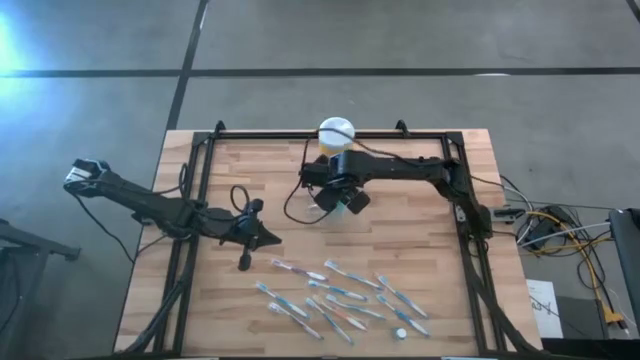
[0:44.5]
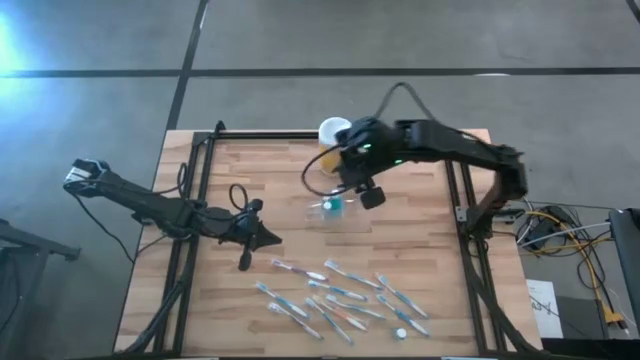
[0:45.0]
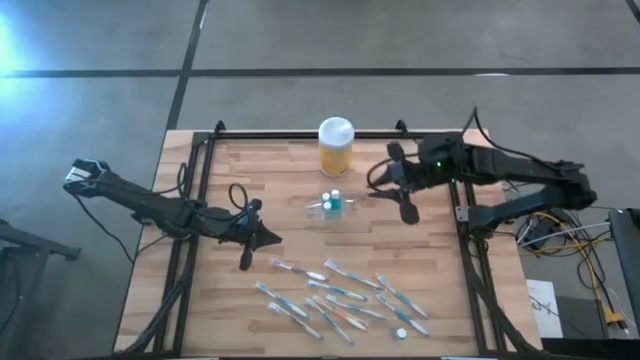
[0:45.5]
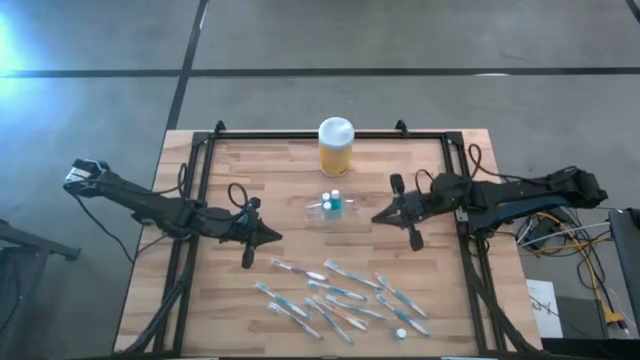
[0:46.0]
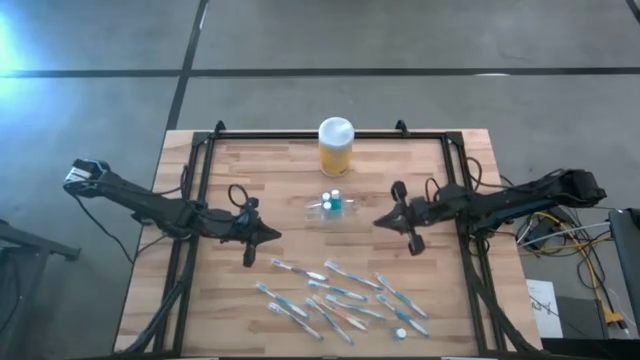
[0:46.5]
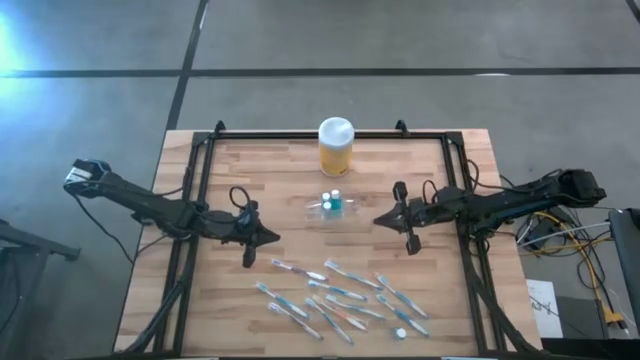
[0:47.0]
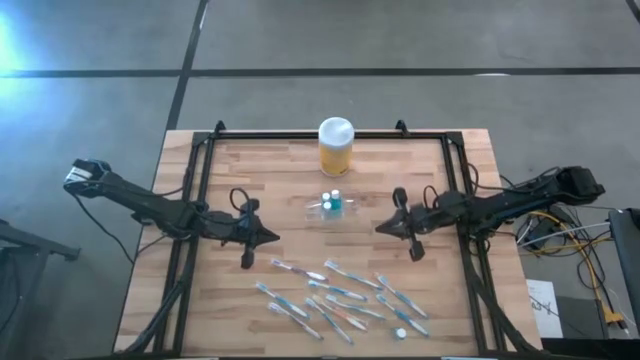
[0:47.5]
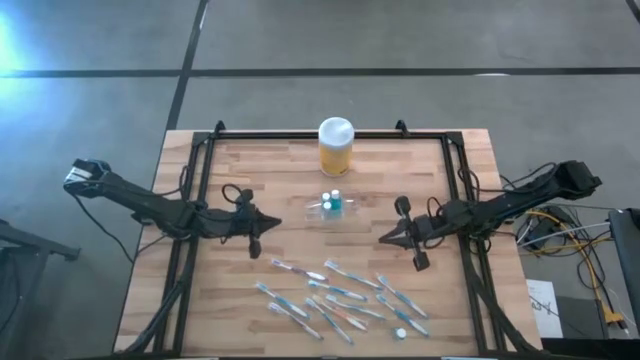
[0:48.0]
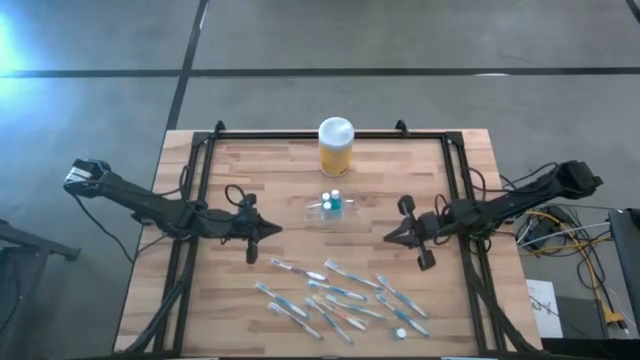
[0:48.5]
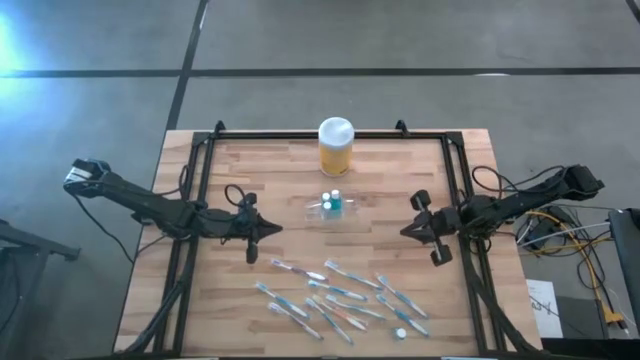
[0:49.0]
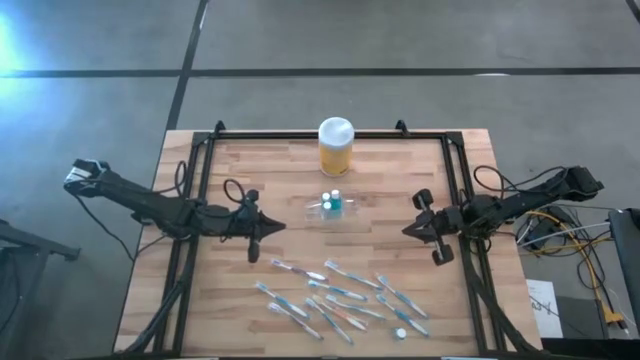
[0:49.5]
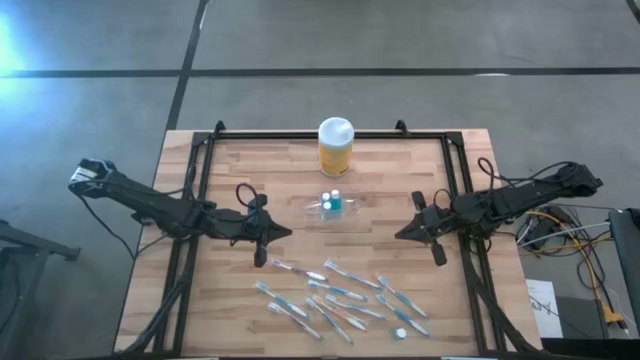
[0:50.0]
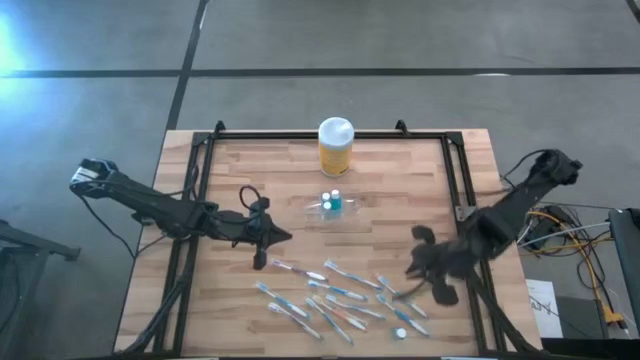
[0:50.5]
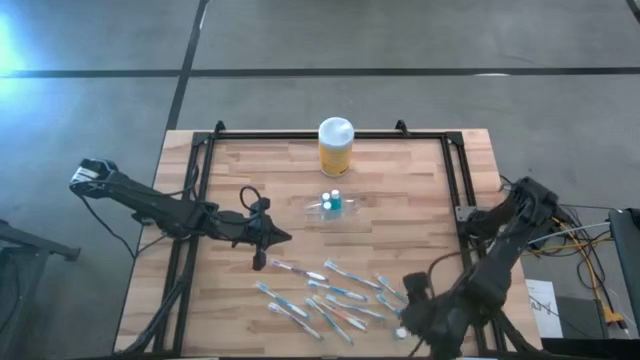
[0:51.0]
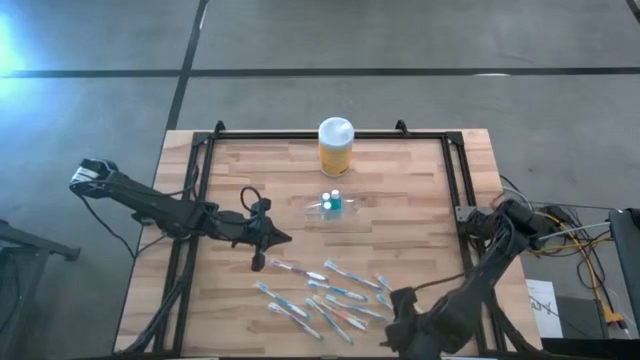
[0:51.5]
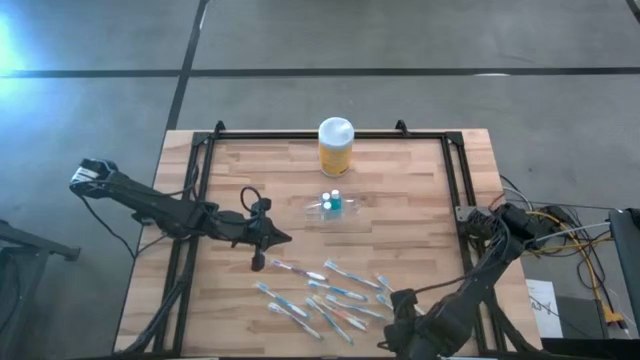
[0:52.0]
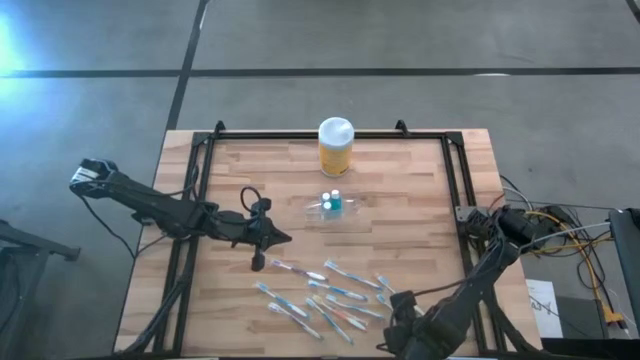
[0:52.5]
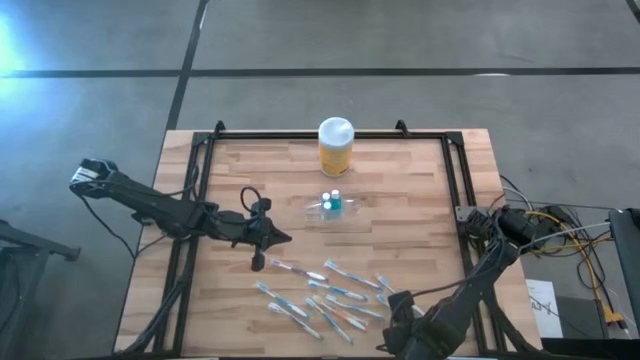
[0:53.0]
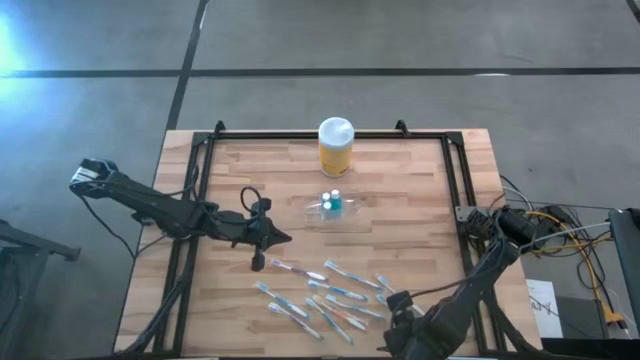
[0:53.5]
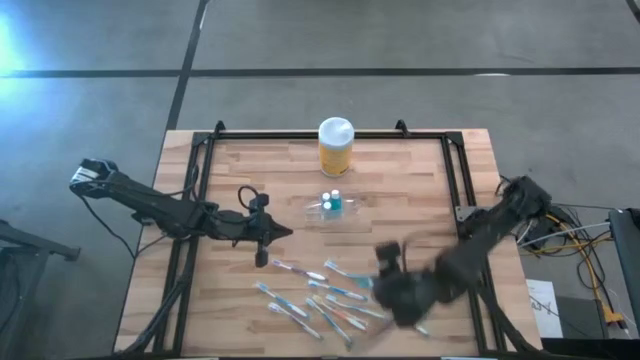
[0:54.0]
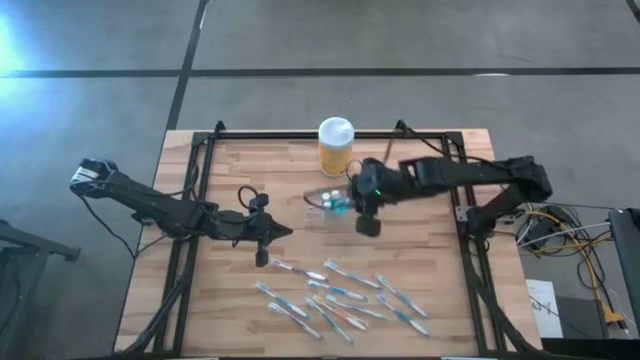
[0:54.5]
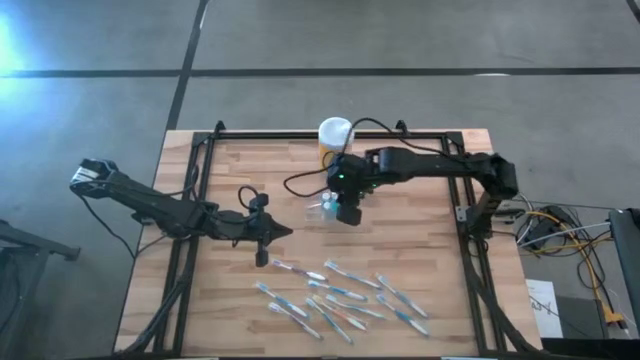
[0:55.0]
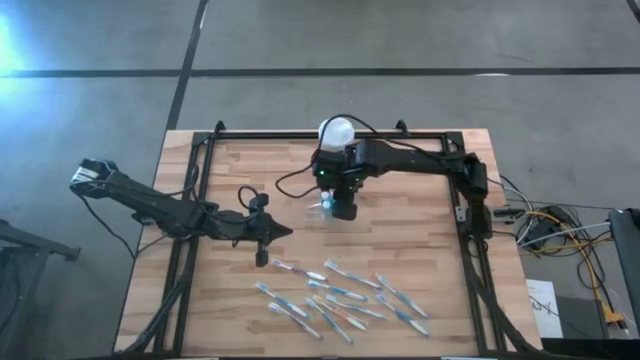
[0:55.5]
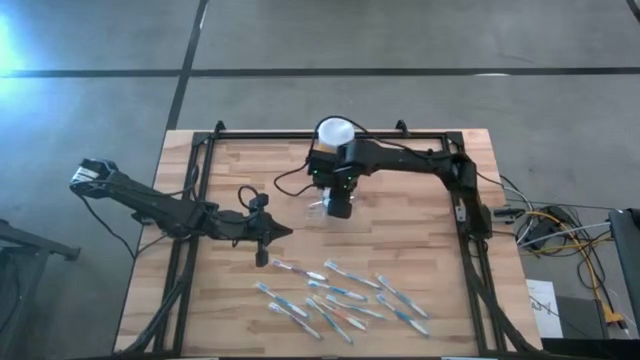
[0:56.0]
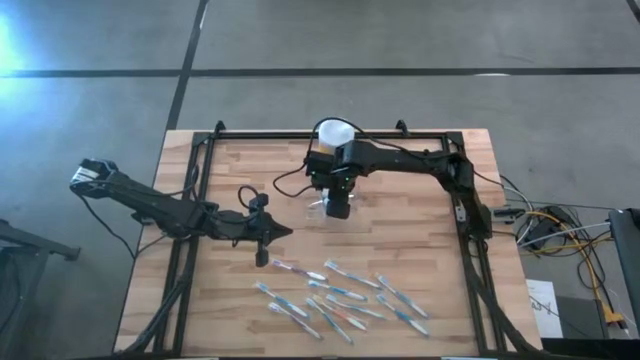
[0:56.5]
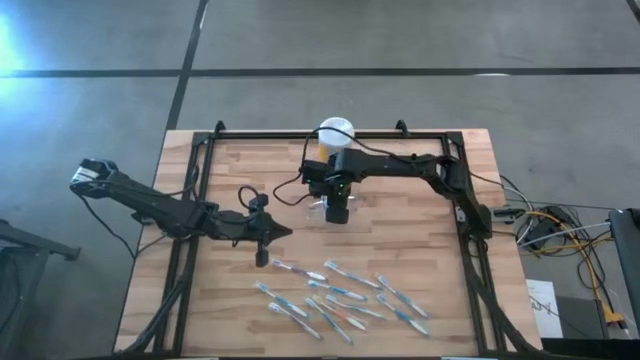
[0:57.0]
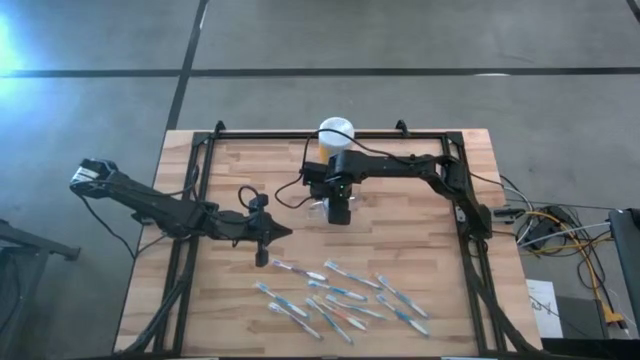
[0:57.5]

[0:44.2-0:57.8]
Task: Pick & Place toothbrushing station
Put the mouthwash bottle into the transparent organizer

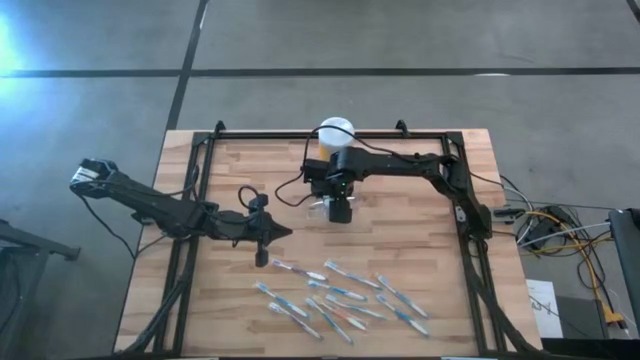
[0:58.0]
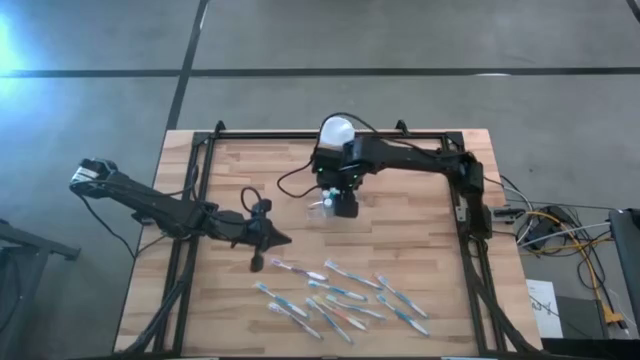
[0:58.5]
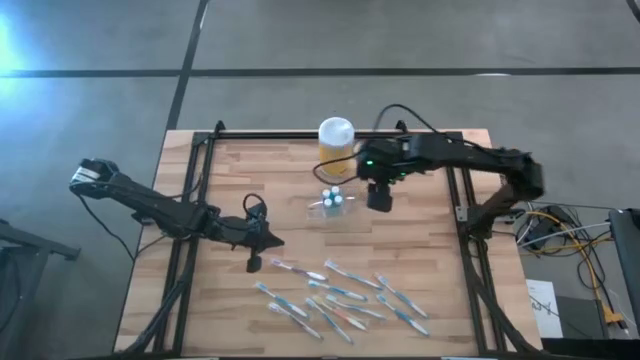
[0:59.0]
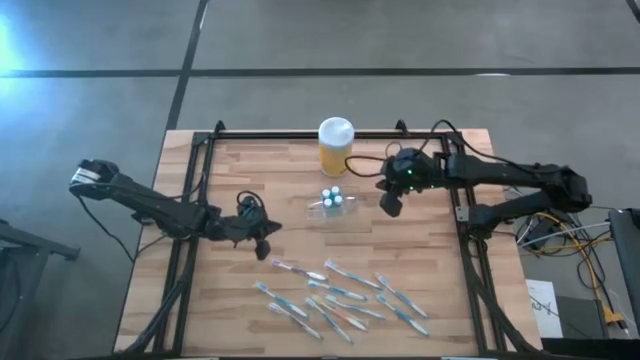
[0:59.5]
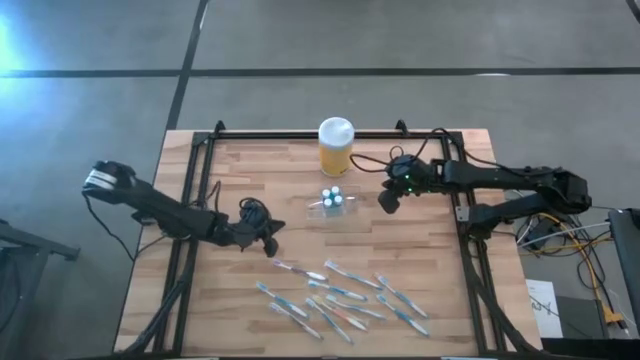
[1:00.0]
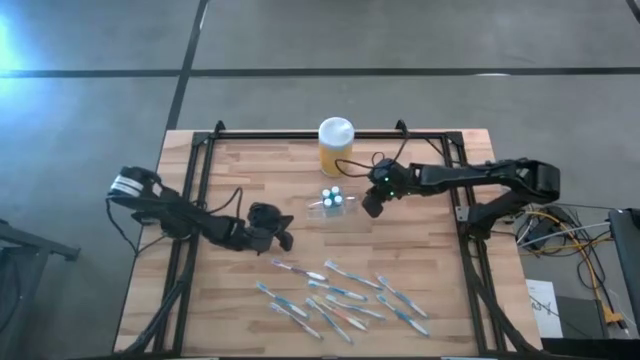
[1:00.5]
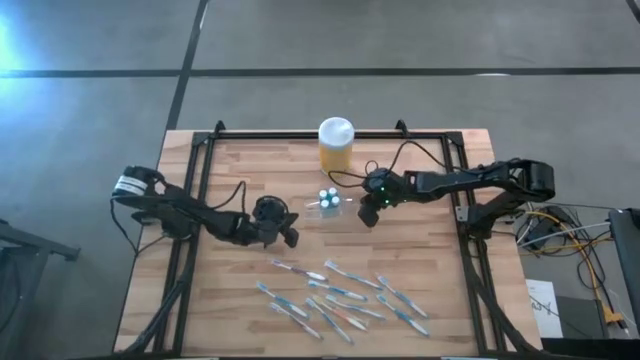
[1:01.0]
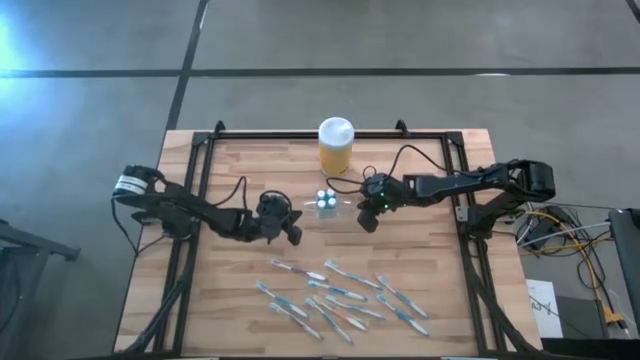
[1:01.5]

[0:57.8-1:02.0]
Adjust the transparent organizer

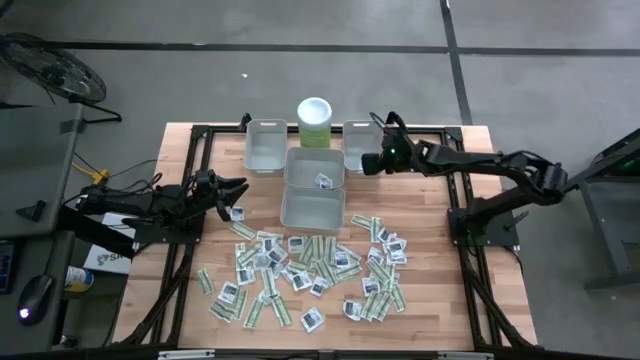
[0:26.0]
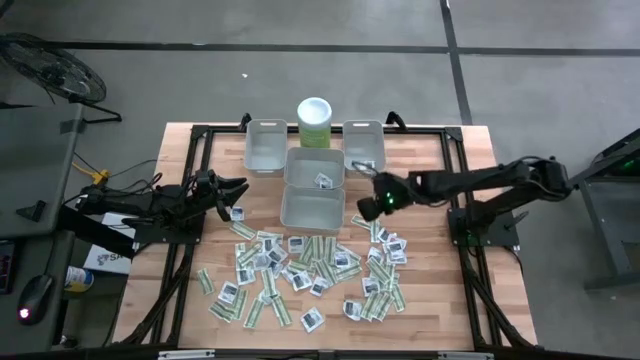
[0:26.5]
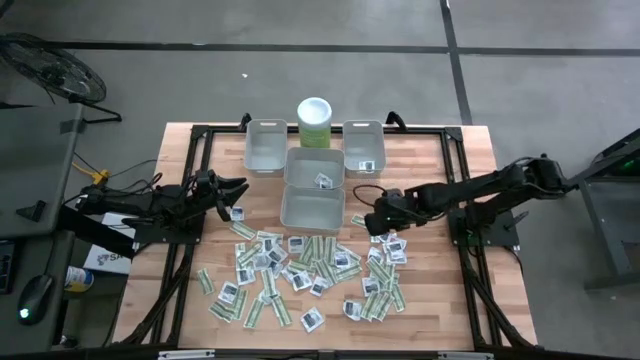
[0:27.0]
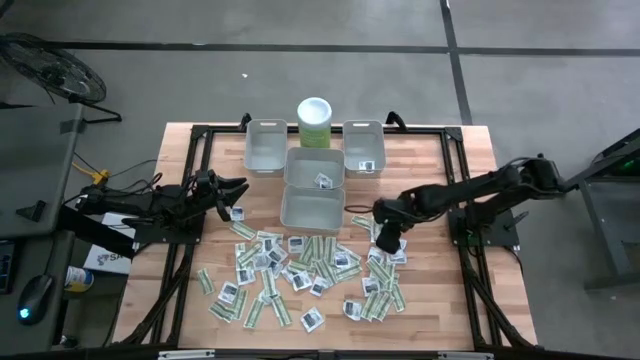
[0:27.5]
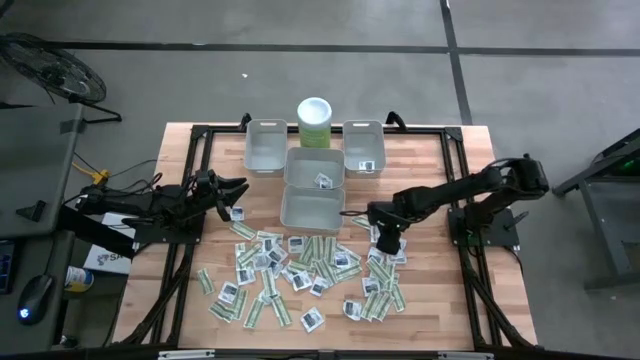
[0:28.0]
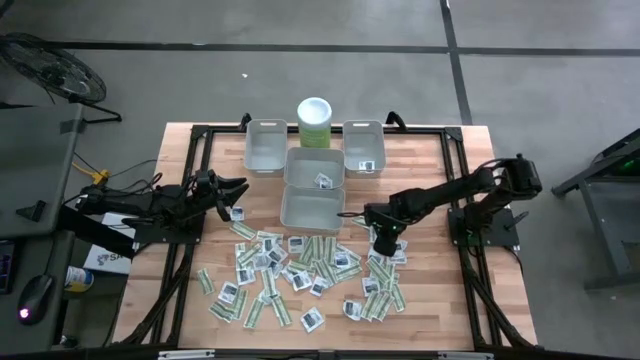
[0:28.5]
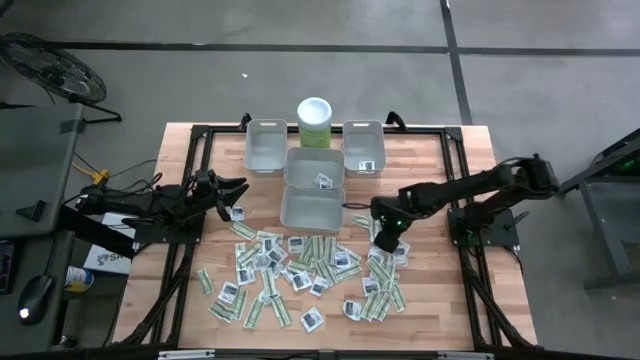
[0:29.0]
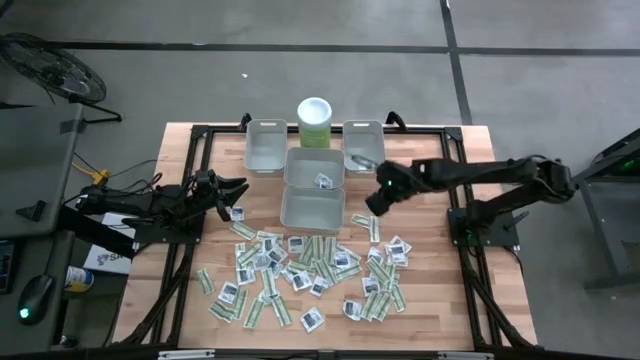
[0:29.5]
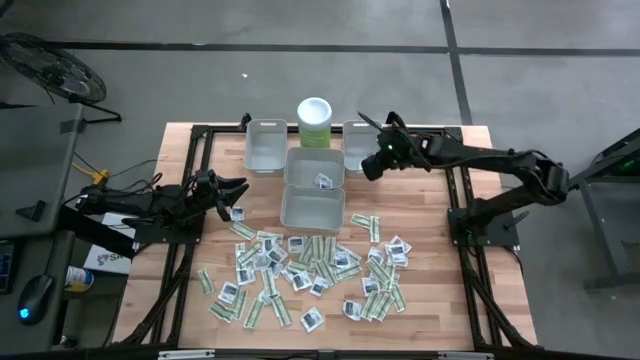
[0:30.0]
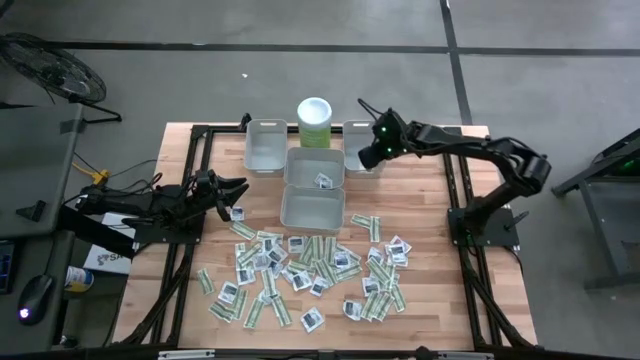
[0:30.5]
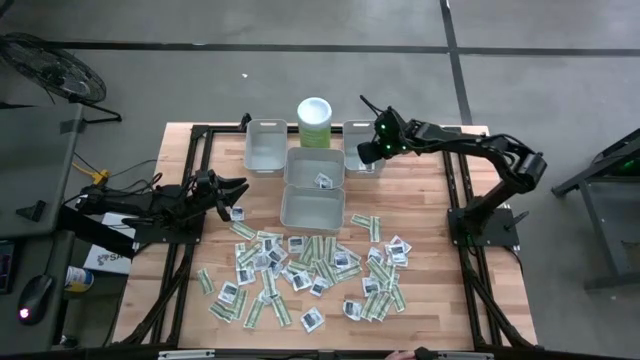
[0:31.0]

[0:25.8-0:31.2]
Task: Pick & Place First Aid Supplies
Put the towelette pack into the right bin
